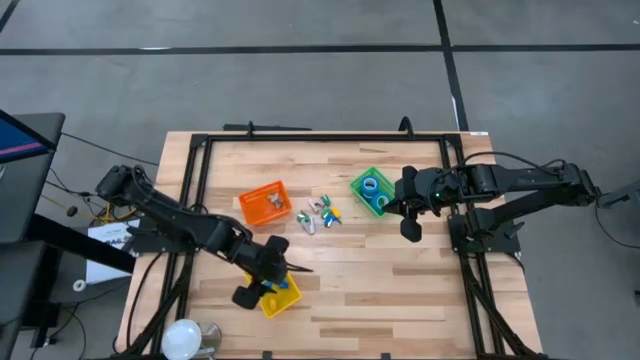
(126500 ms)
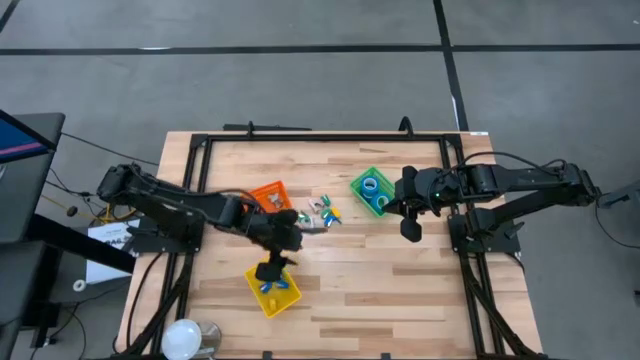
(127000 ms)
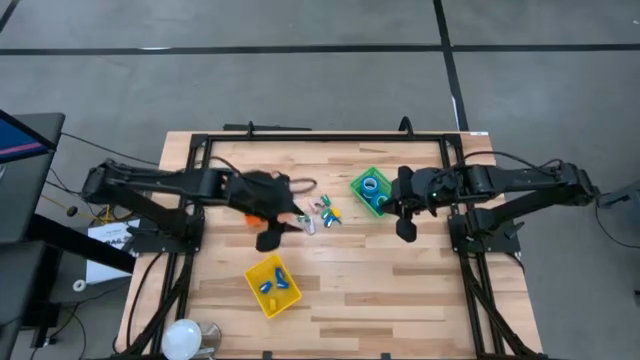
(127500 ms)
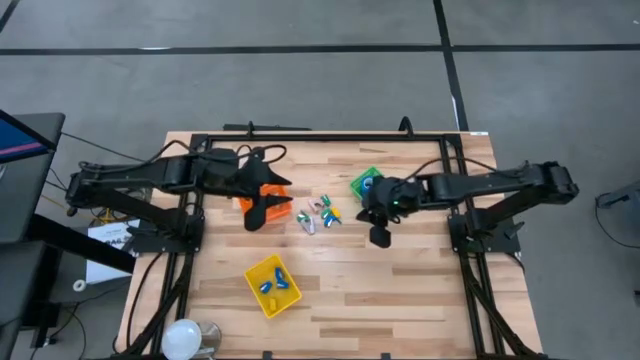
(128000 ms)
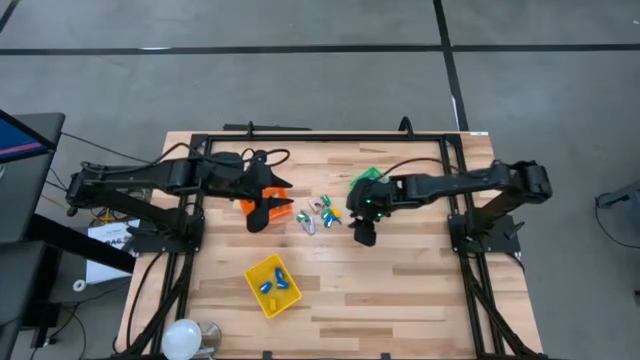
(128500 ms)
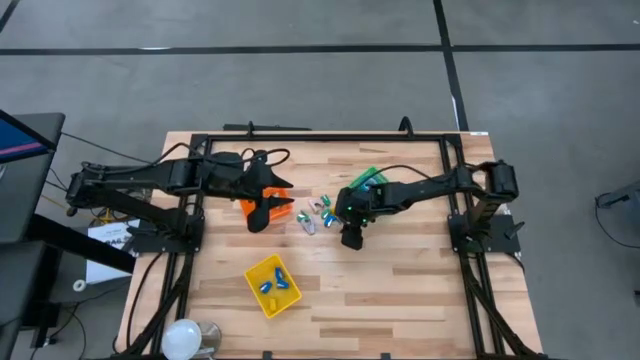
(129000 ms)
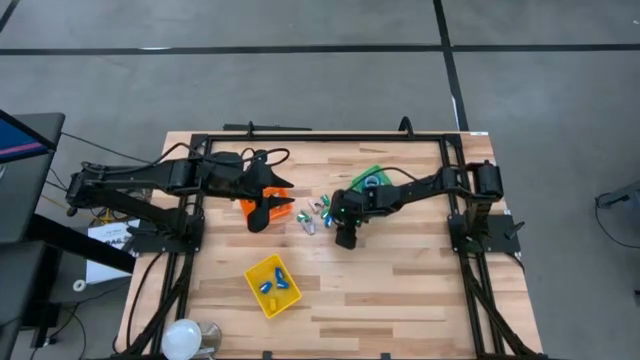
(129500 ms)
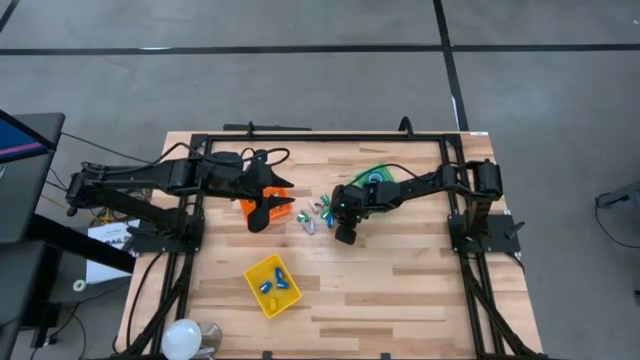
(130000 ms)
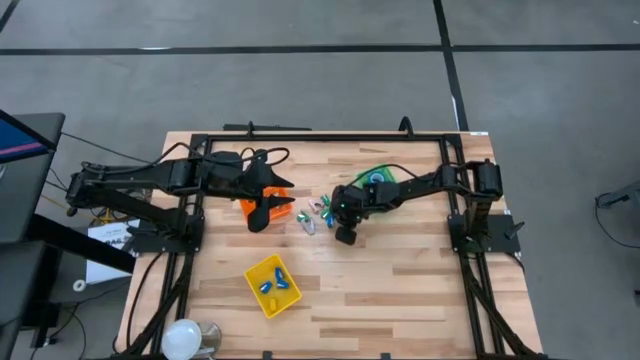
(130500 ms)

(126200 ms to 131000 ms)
Task: Pick and place Stapler, Stapler remover, tape
Put the blue stapler into the yellow basket

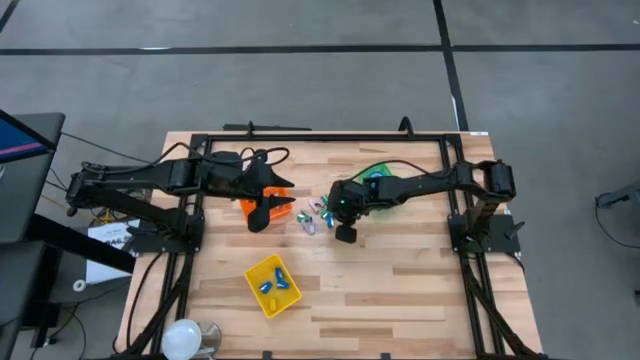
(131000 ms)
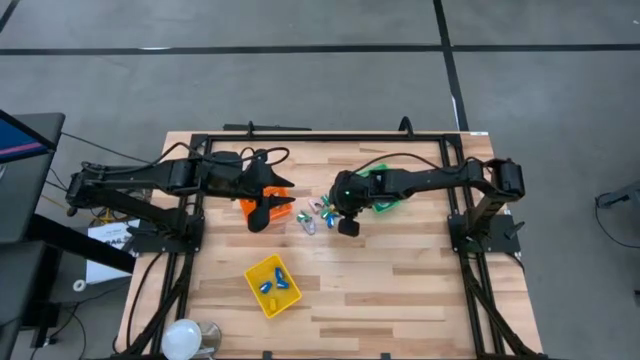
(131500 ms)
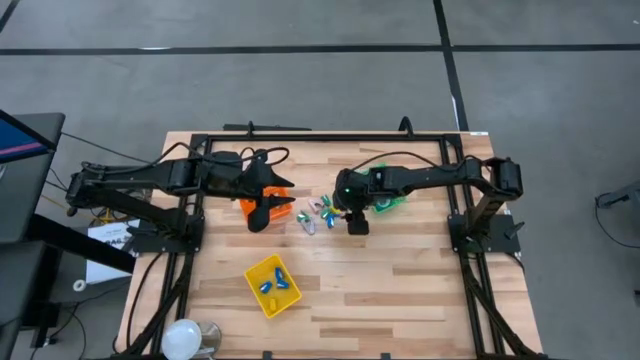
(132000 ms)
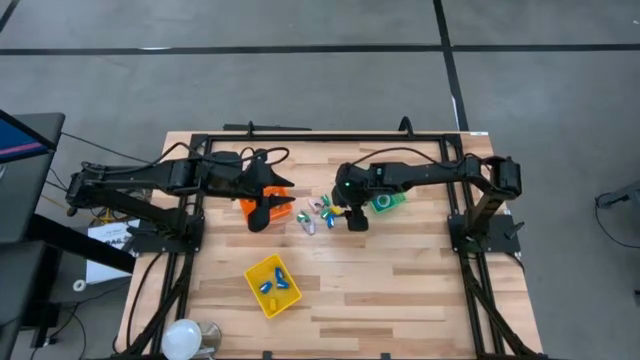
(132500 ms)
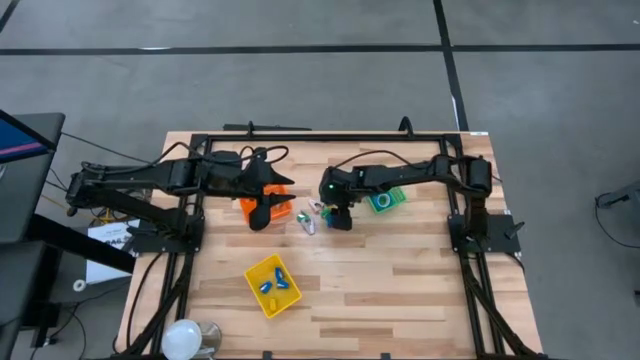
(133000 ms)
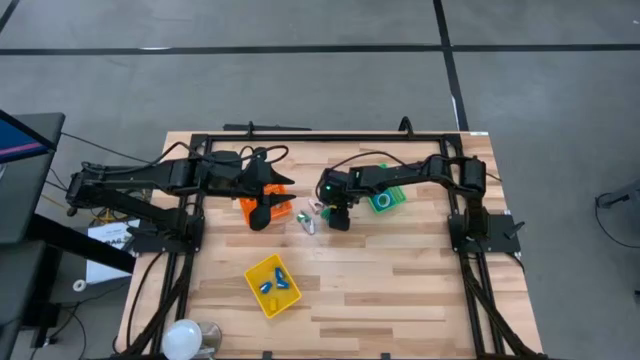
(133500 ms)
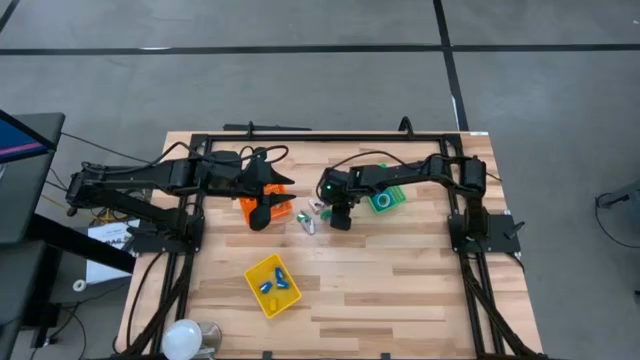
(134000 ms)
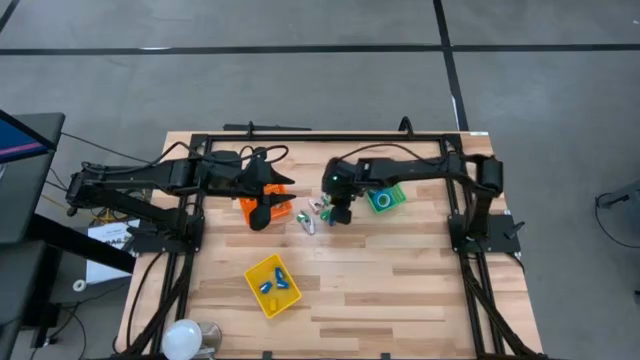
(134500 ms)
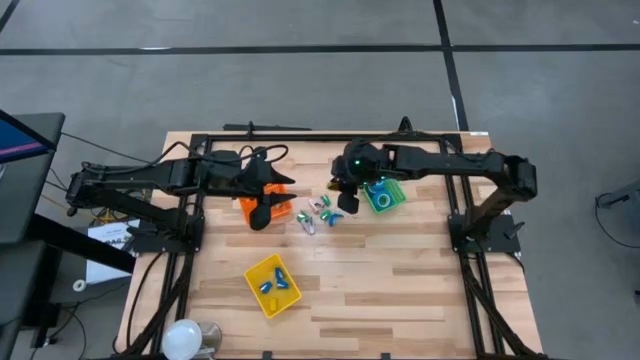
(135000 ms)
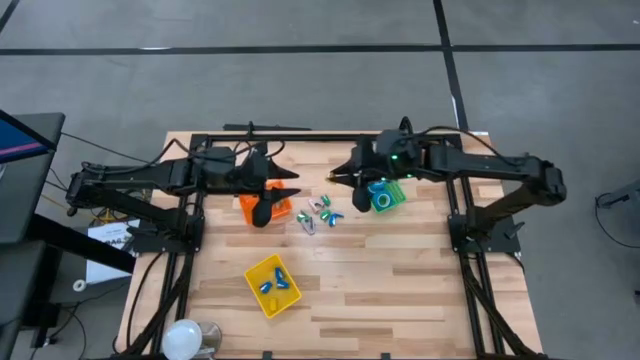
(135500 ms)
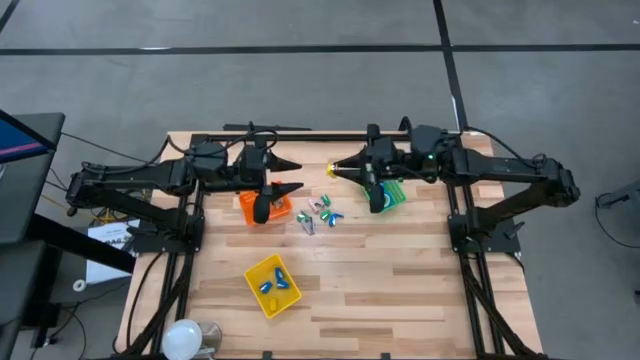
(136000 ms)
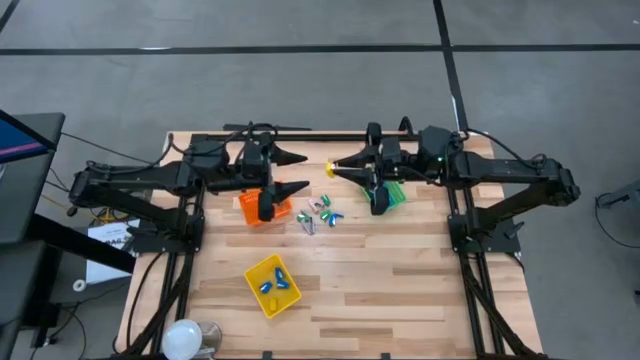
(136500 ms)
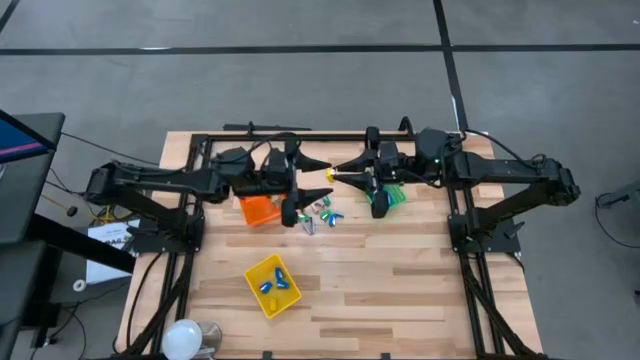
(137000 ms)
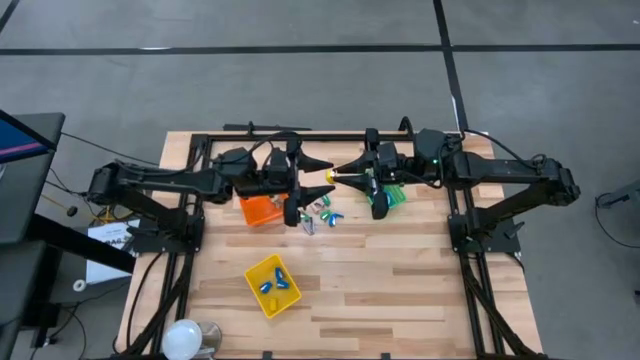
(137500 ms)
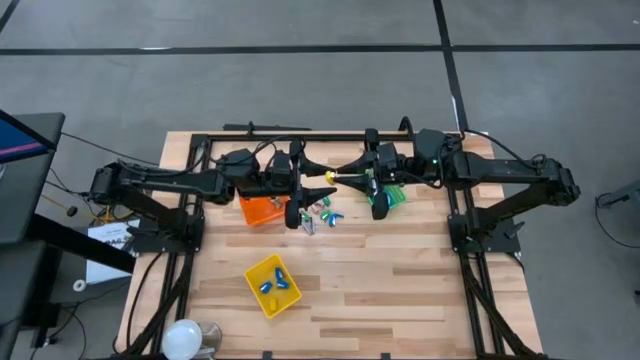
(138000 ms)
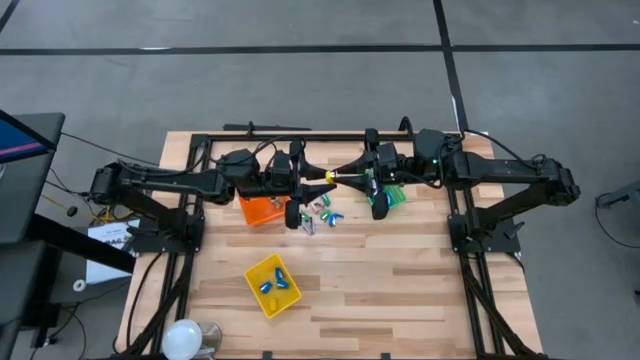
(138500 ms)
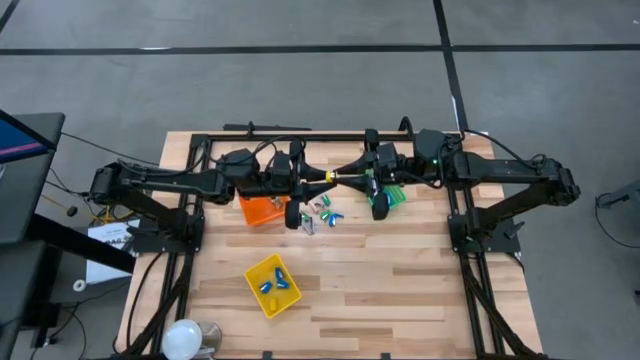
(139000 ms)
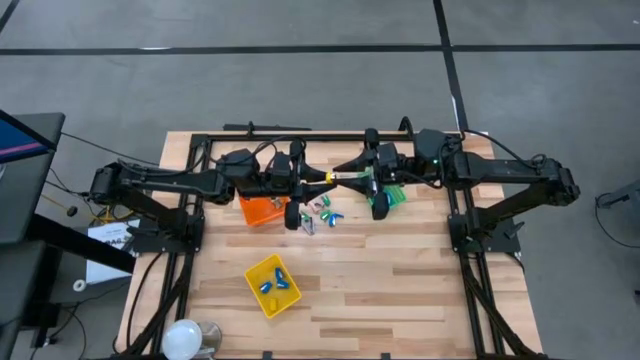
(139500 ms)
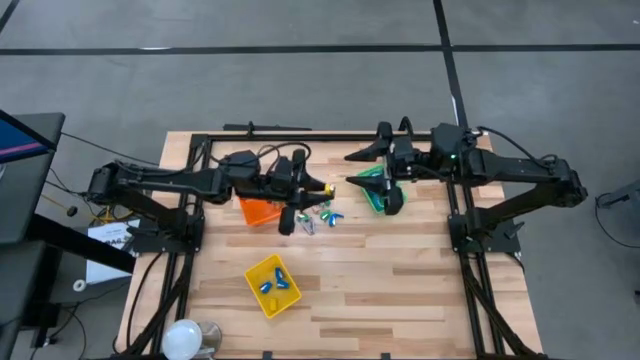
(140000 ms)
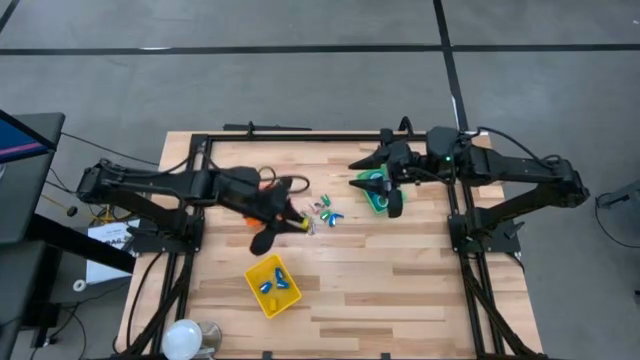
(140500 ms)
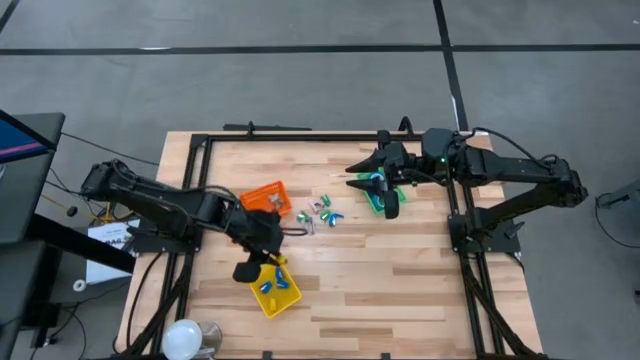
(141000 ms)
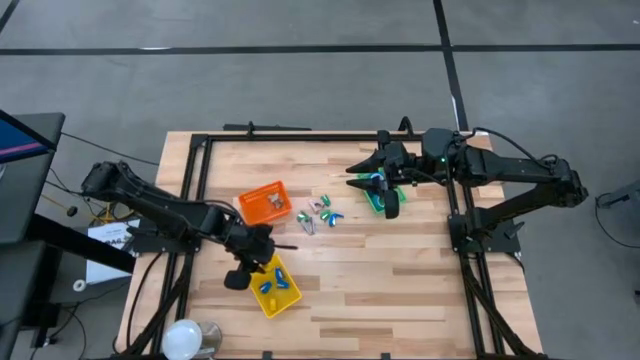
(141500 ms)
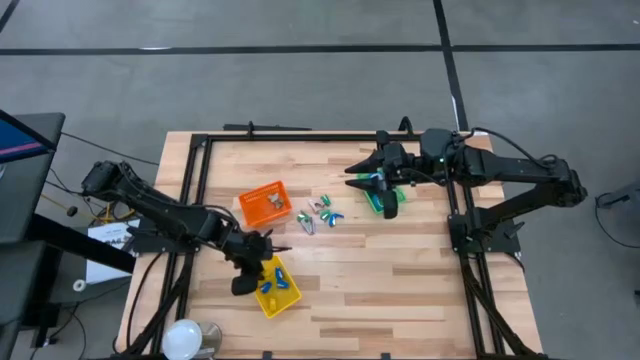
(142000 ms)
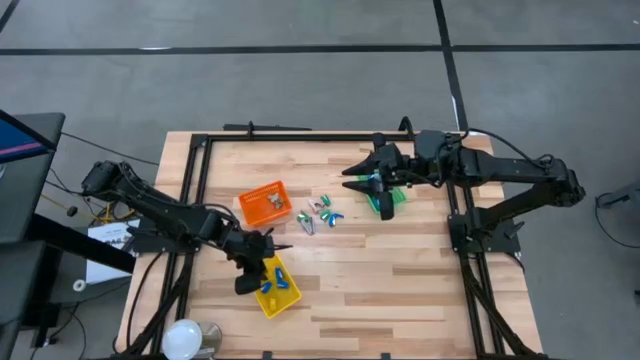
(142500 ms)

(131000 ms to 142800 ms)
Put the yellow stapler into the yellow basket

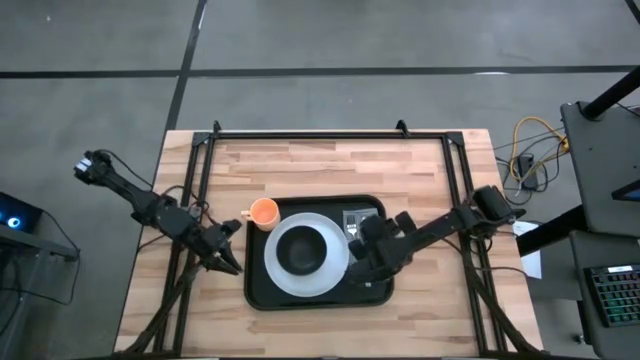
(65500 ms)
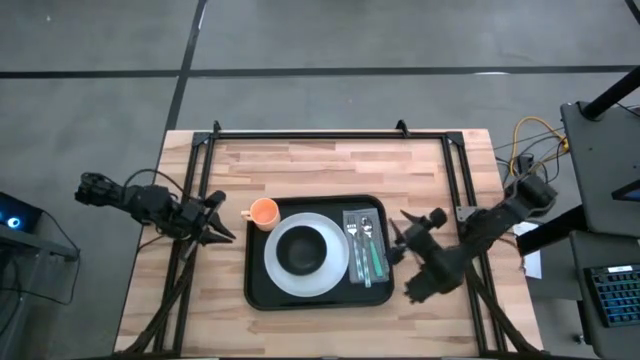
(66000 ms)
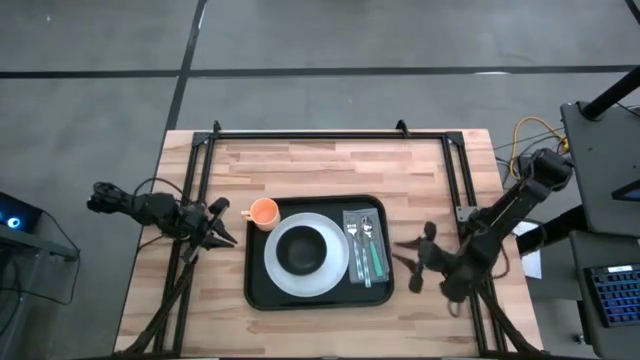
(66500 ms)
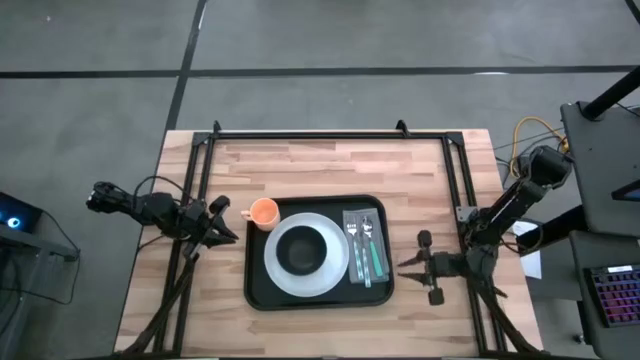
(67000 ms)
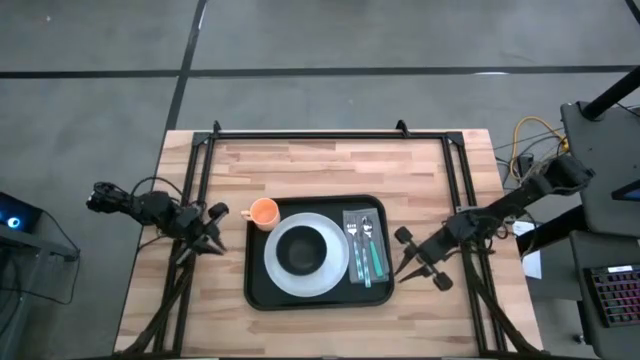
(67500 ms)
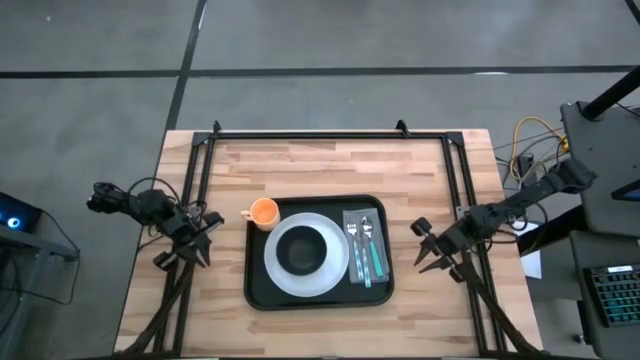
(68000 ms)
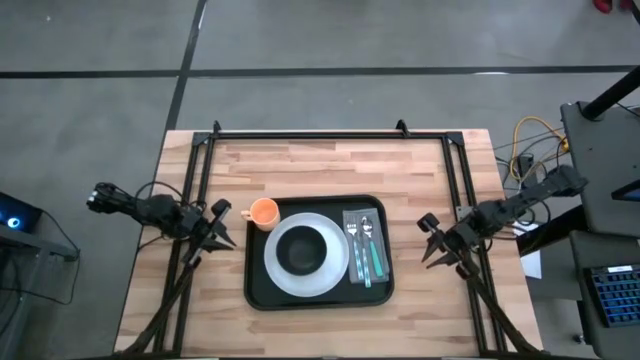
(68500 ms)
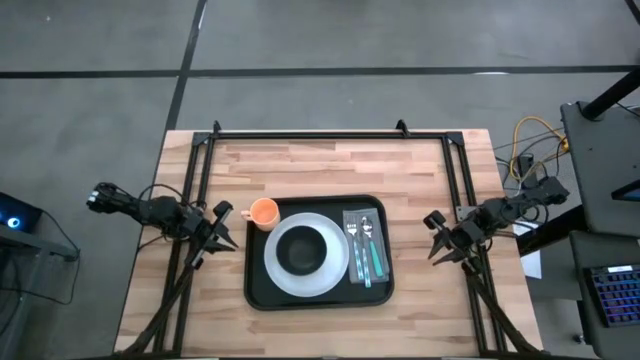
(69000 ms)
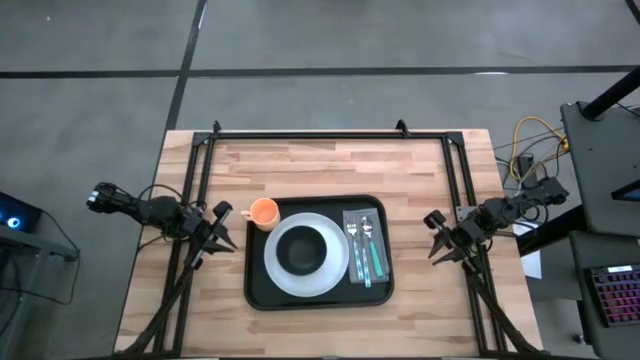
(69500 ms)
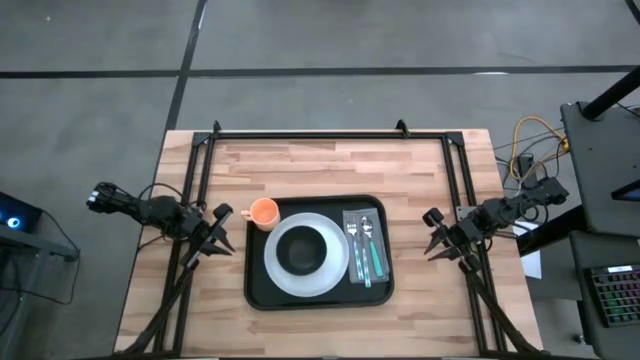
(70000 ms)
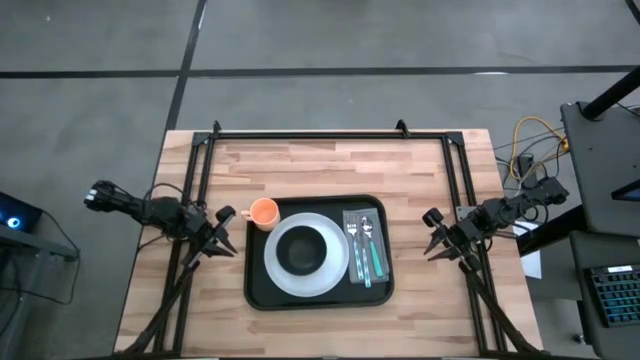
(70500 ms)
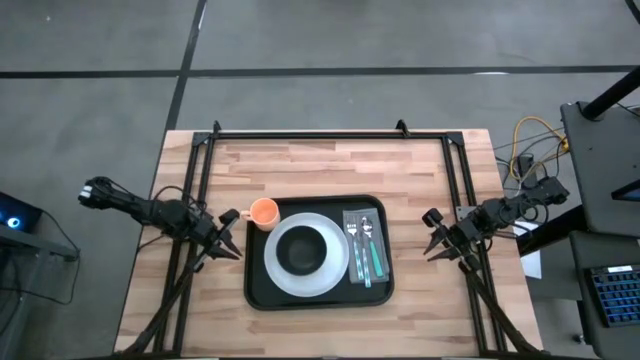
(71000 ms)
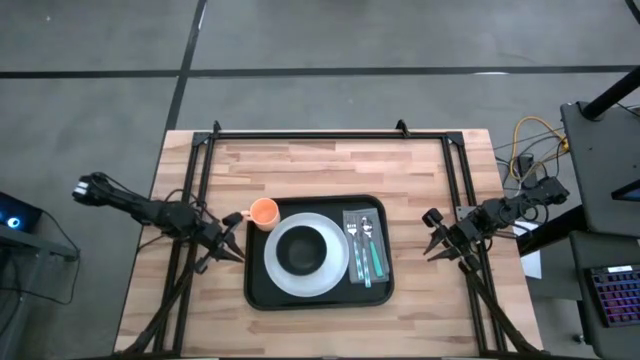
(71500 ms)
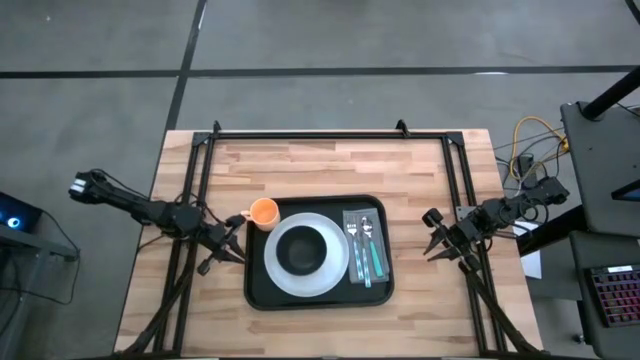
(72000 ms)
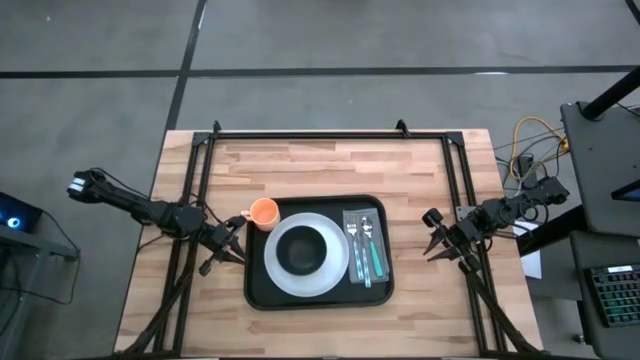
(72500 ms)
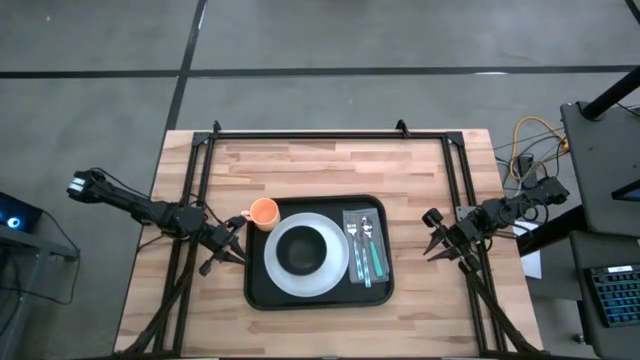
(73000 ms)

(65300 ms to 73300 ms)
Task: Set up tray
Return to Home Position
